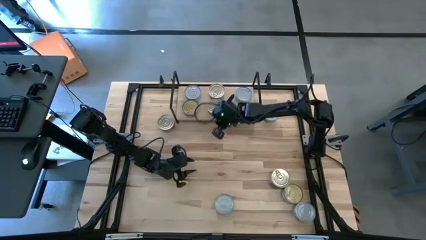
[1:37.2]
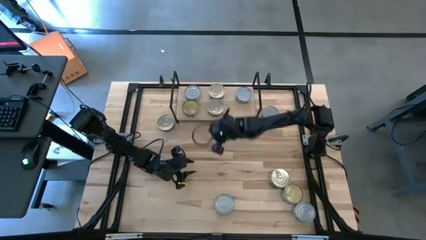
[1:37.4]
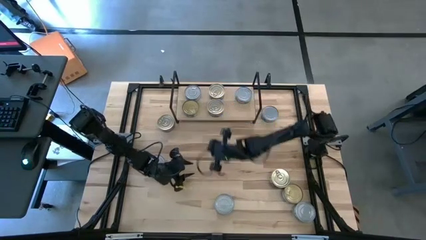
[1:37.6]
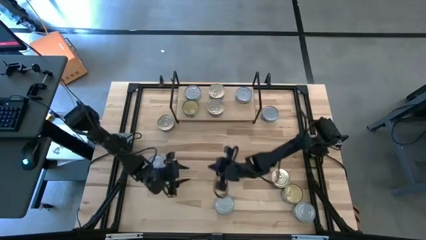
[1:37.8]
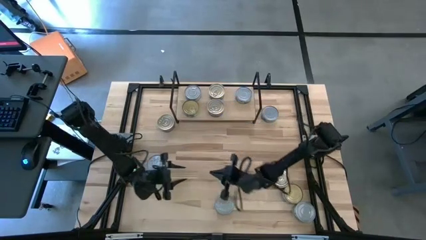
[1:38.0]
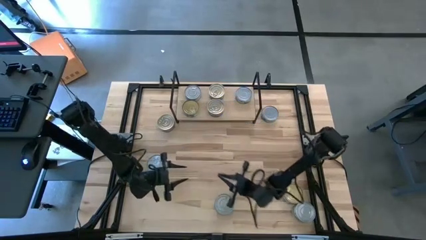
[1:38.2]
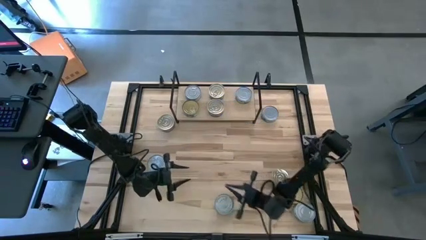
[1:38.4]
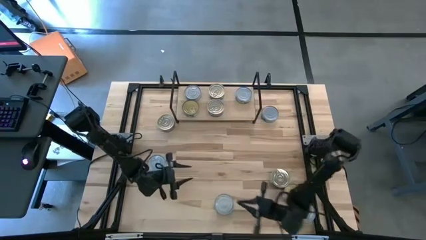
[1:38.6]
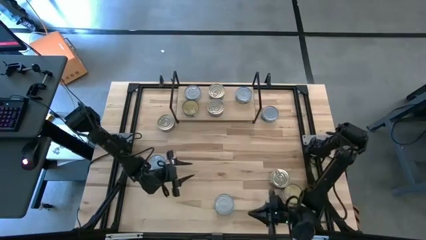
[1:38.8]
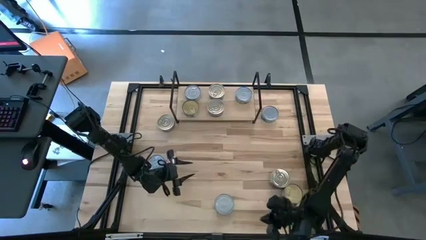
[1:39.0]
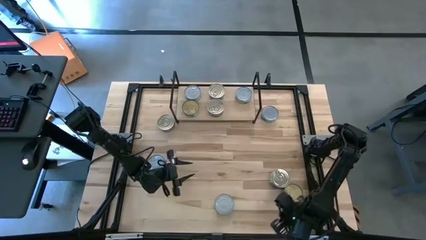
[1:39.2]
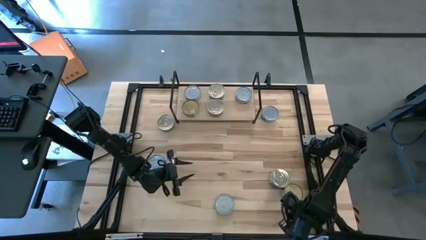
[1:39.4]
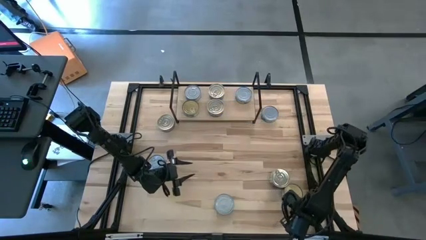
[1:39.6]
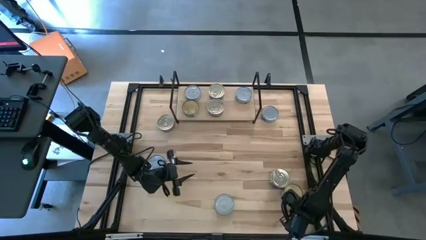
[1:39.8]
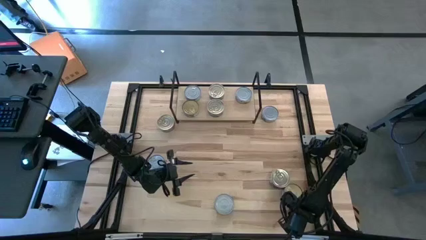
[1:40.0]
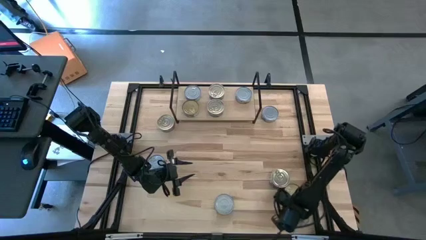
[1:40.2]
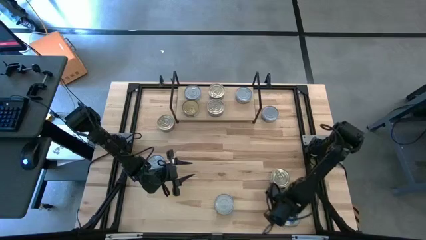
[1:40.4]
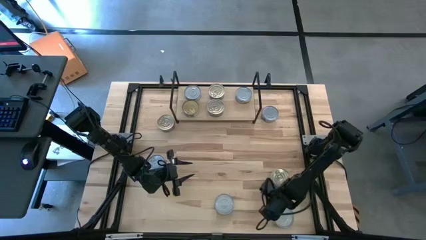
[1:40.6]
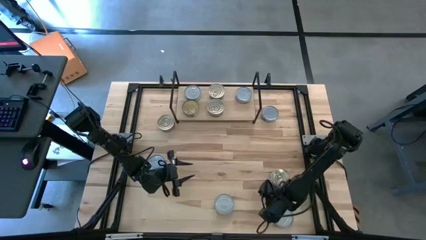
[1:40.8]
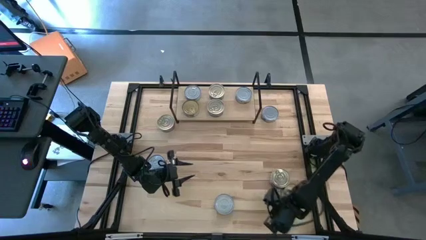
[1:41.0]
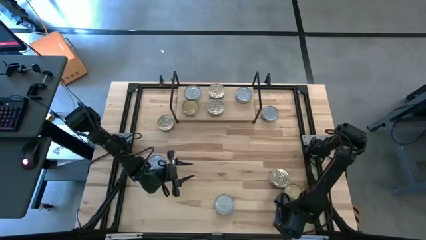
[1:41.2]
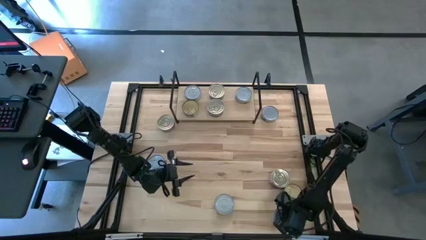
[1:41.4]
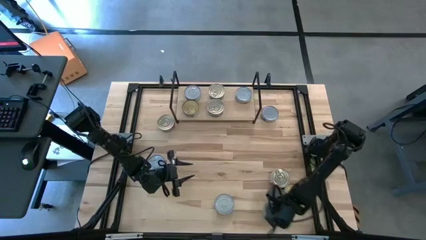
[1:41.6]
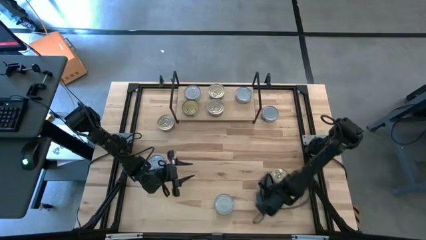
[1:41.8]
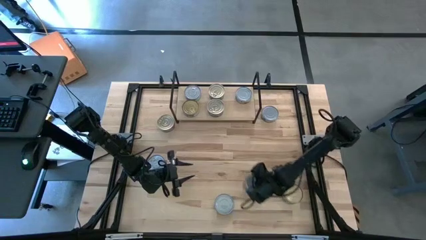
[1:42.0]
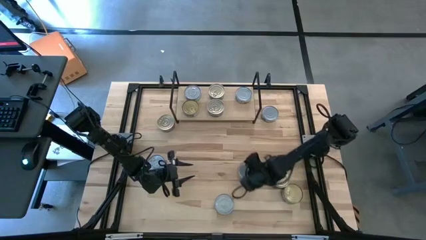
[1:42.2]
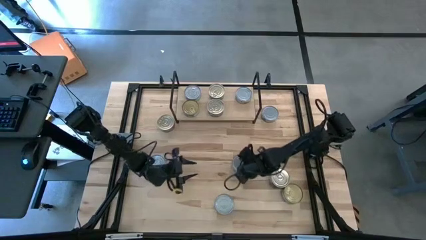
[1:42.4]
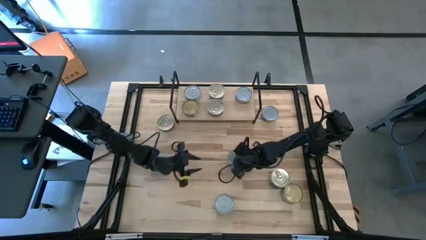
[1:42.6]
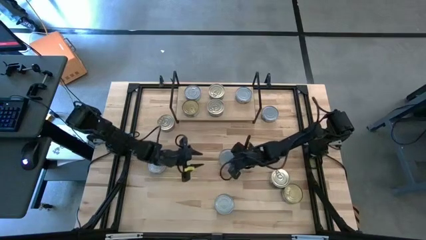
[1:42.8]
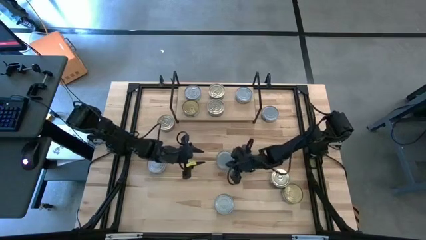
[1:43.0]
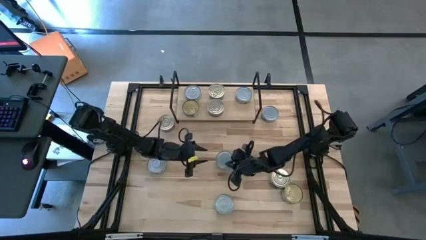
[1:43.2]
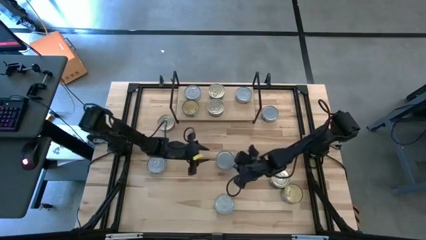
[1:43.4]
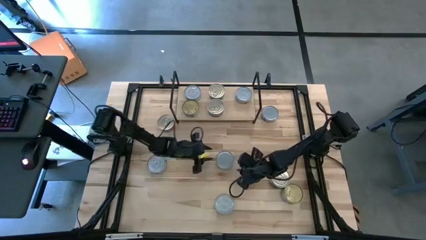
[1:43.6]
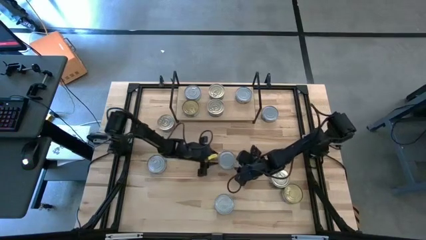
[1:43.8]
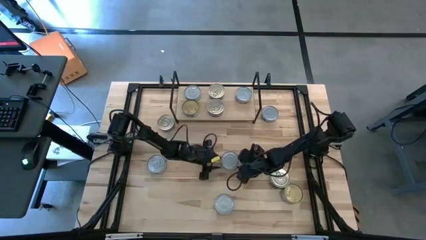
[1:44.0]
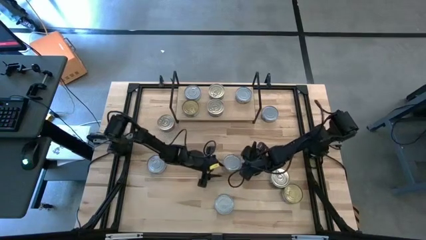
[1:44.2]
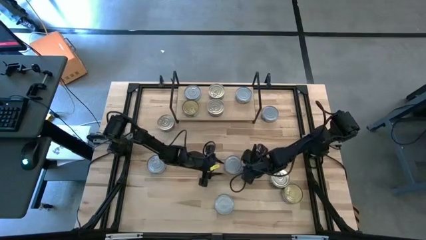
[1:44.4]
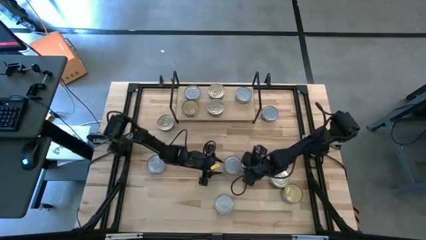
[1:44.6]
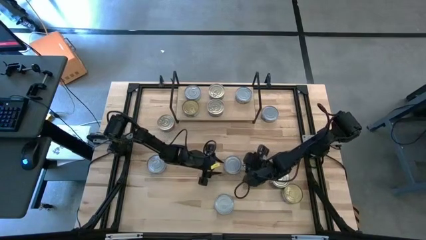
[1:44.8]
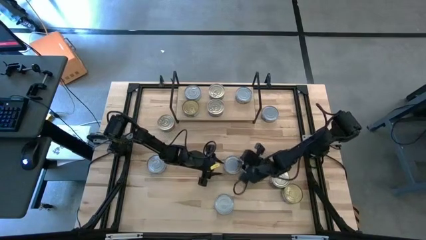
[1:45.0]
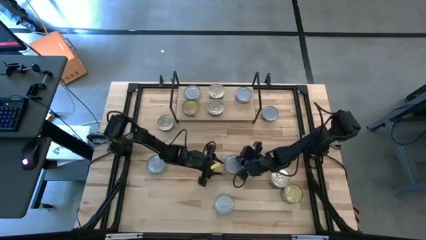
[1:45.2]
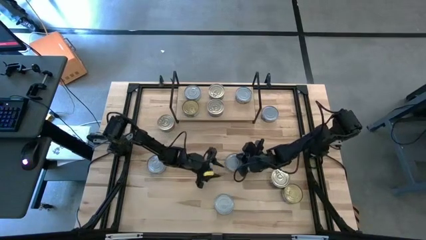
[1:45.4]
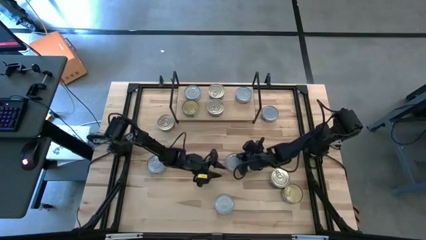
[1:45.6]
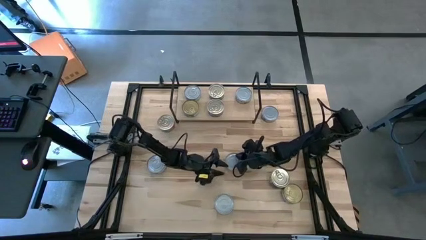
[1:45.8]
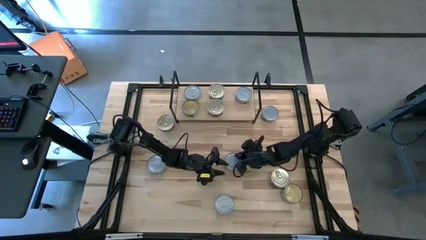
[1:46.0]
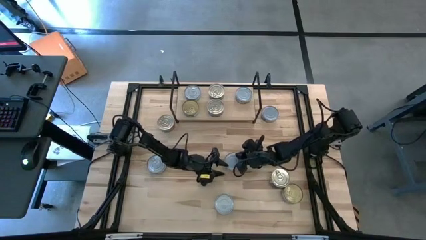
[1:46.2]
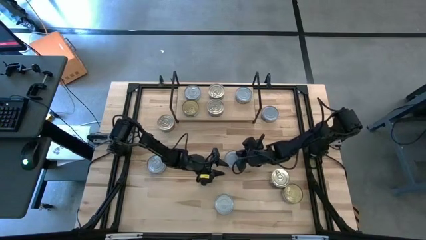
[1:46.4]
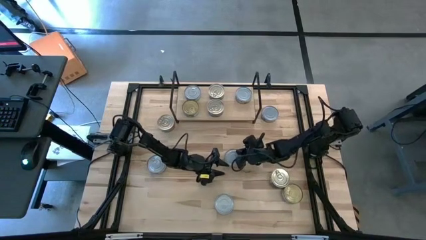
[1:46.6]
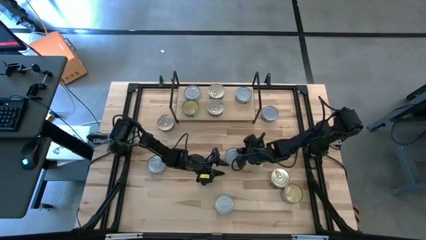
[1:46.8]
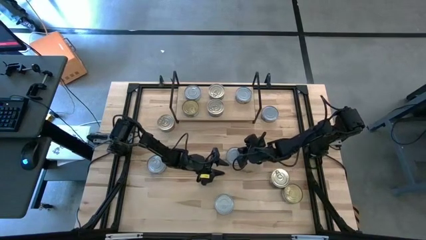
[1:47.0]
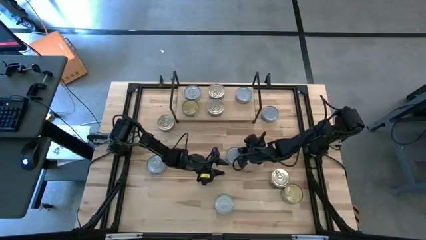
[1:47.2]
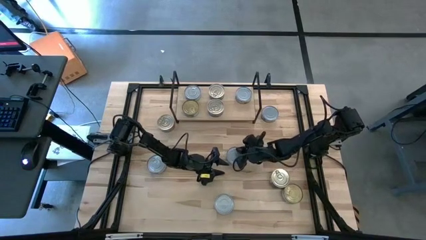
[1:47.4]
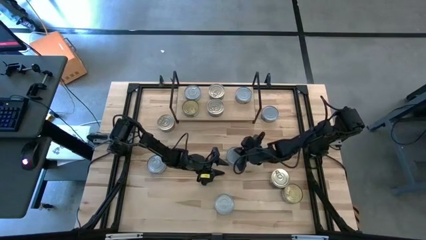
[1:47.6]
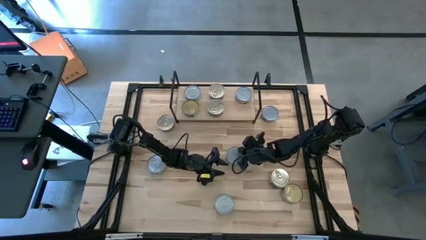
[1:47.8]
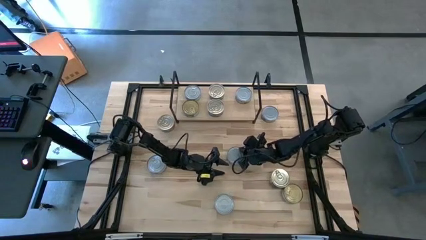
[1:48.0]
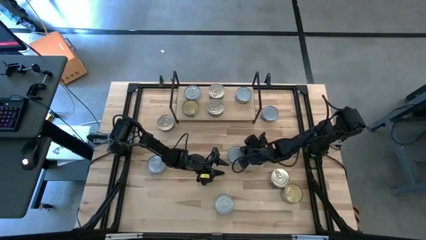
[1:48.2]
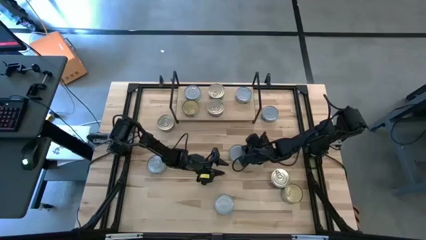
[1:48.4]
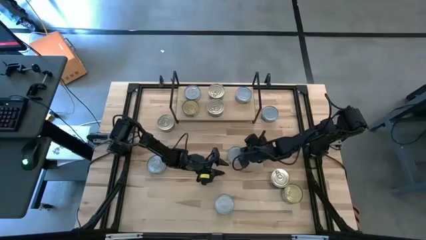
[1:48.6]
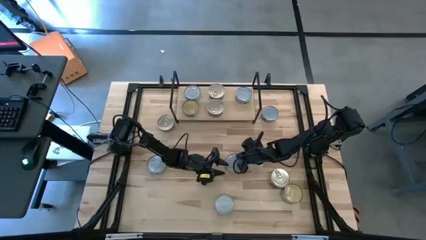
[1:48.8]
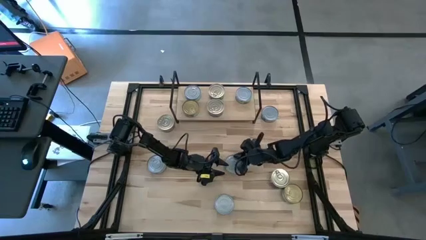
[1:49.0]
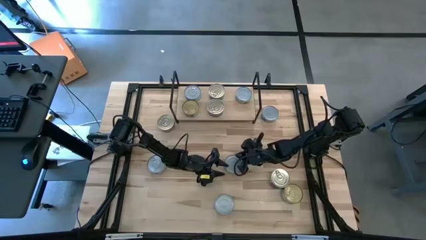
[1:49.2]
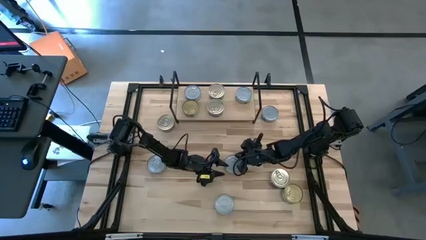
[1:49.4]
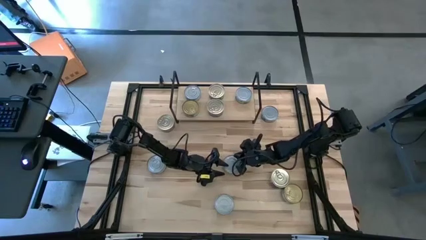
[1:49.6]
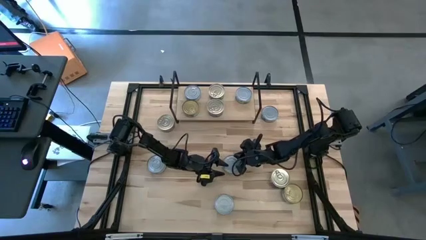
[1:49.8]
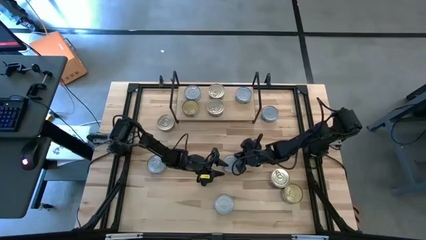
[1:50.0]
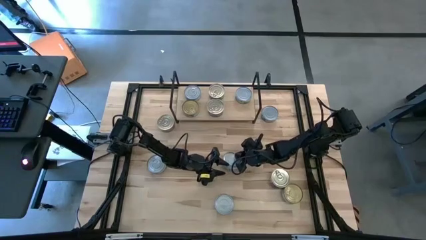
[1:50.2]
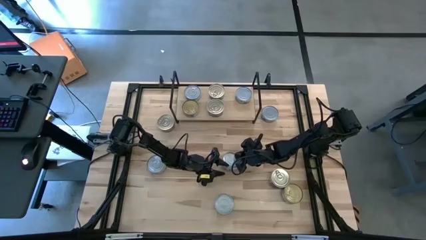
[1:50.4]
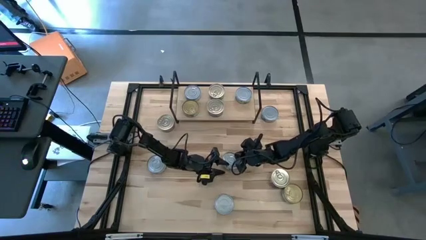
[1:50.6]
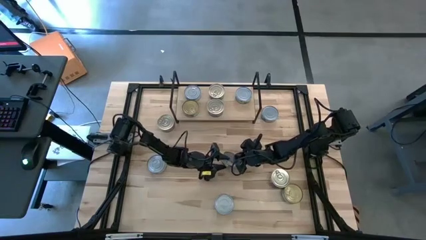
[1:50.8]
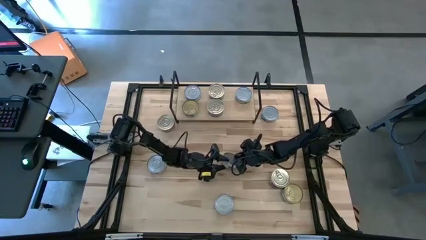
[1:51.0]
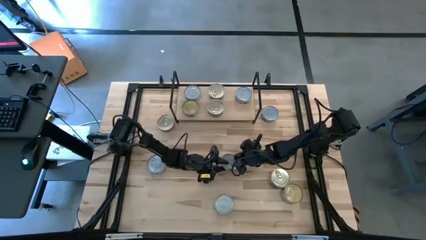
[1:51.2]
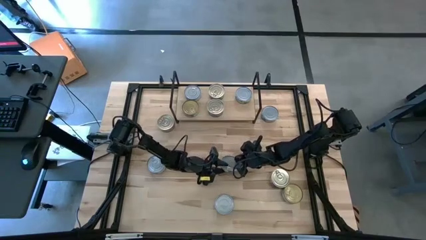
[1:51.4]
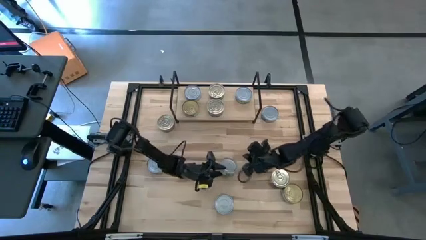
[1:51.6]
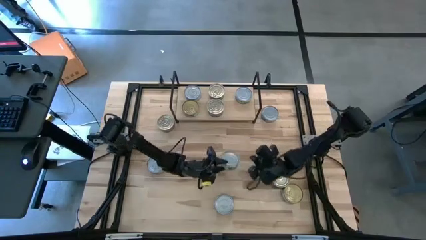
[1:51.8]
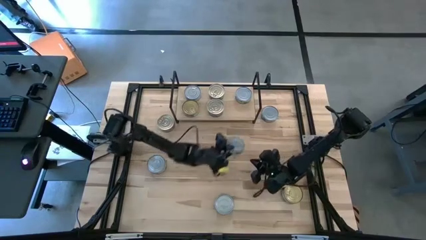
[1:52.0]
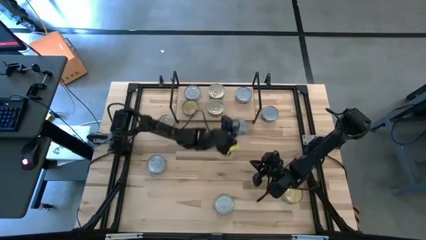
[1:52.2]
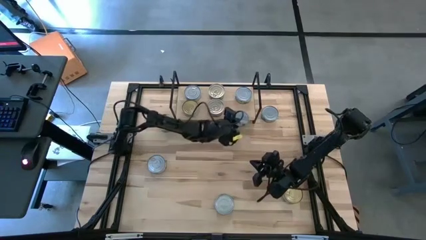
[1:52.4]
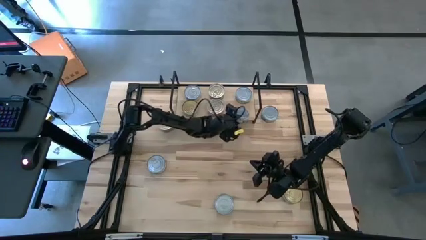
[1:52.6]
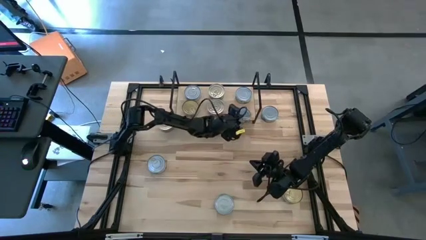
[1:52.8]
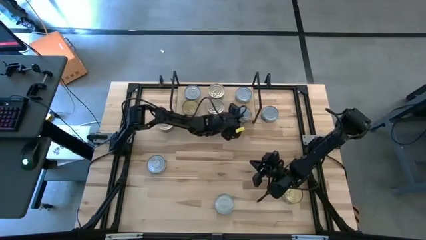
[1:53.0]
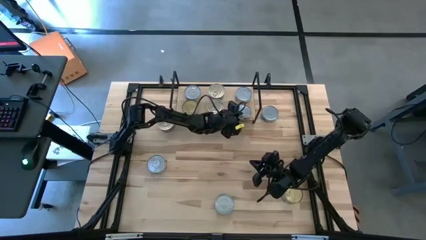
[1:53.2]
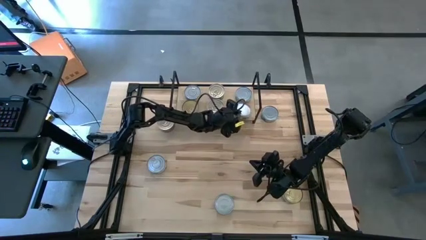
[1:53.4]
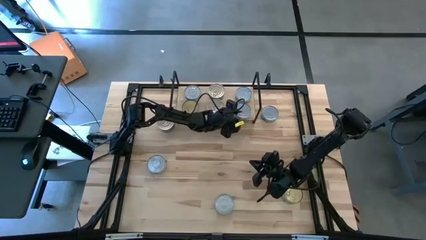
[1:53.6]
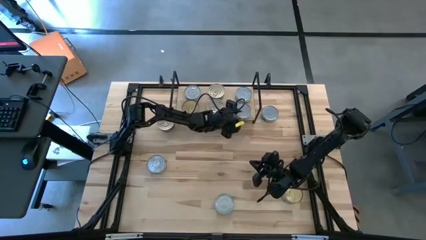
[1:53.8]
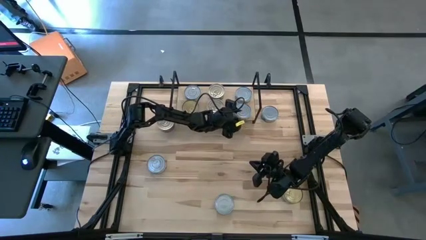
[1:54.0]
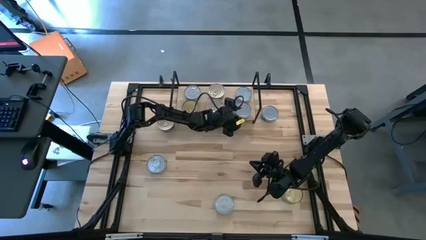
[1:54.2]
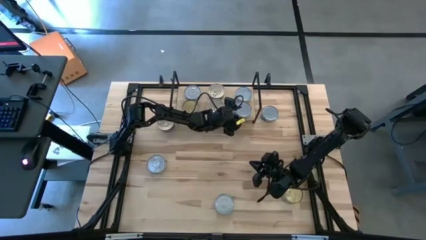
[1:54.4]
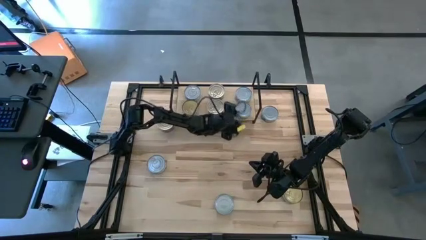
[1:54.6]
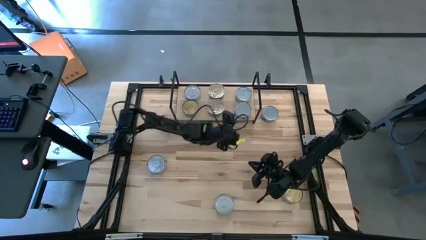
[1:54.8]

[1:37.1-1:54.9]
Task: Stack canned seafood by type on shelf
Put the bottom green tuna can on the shelf aligned with the other green tuna can
